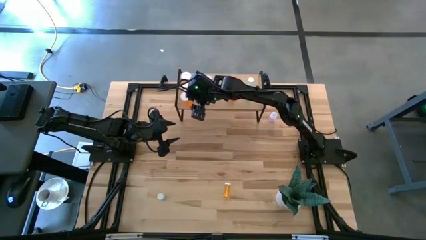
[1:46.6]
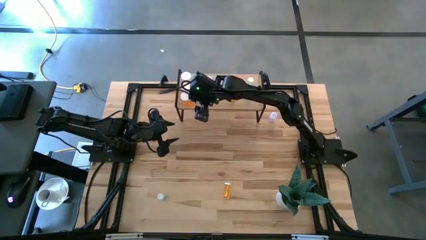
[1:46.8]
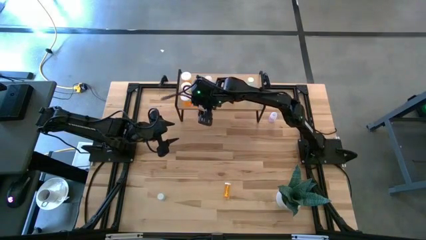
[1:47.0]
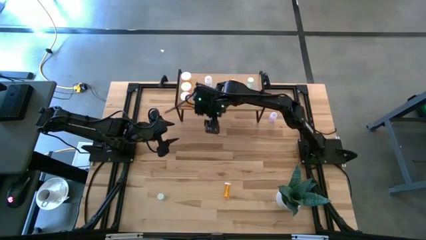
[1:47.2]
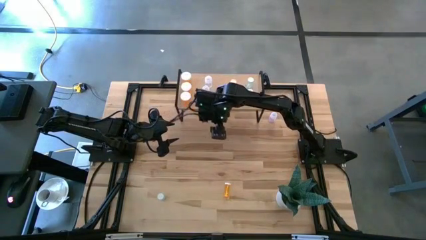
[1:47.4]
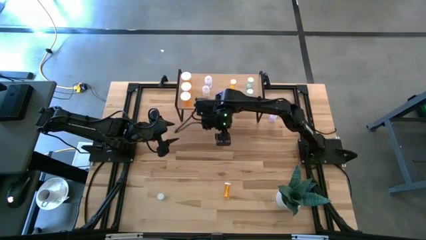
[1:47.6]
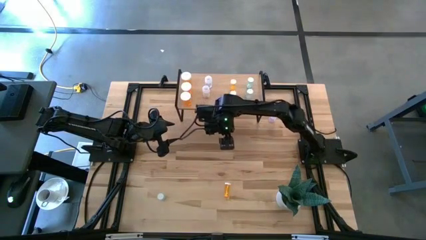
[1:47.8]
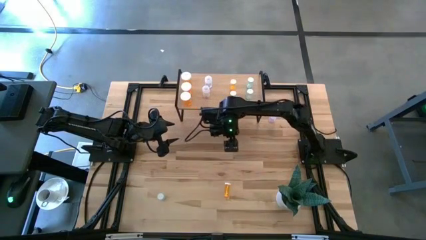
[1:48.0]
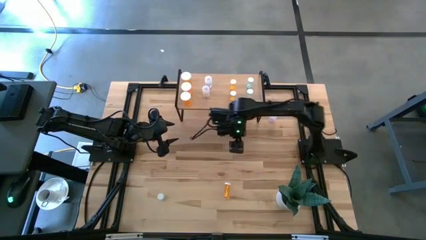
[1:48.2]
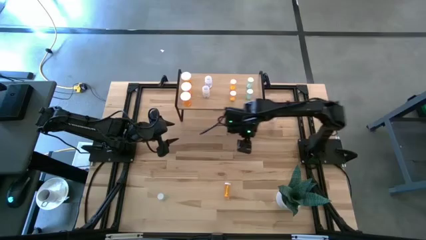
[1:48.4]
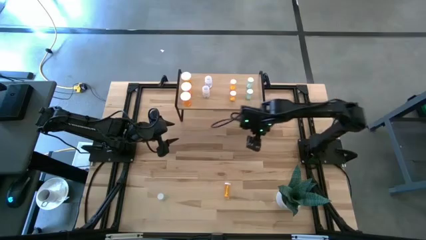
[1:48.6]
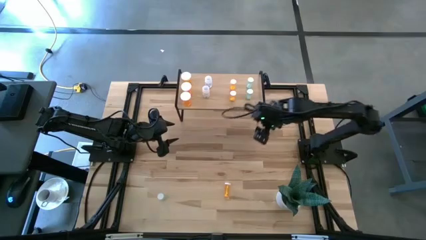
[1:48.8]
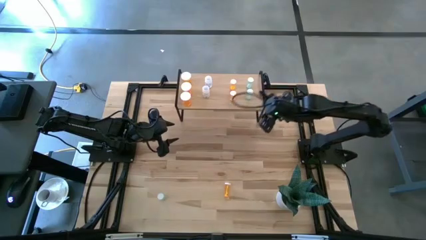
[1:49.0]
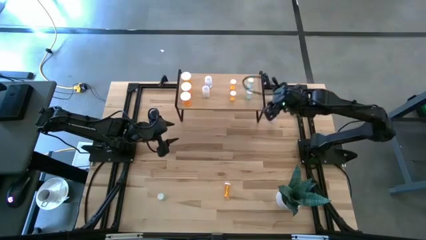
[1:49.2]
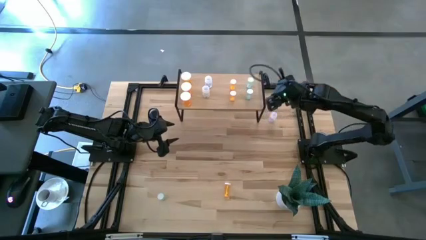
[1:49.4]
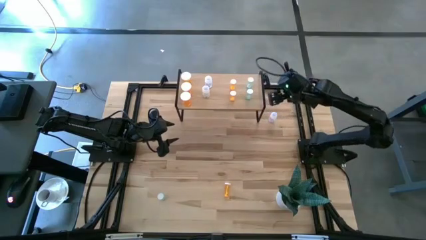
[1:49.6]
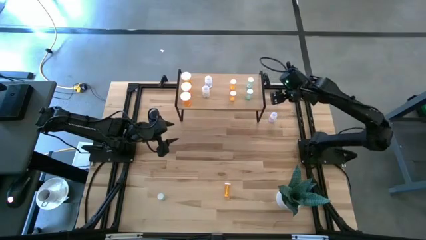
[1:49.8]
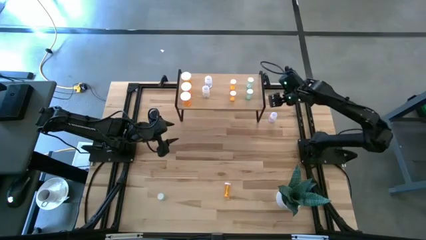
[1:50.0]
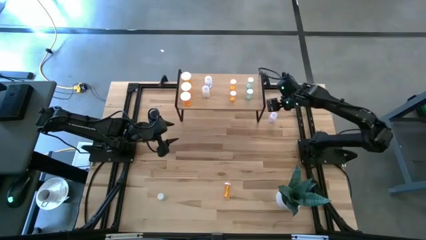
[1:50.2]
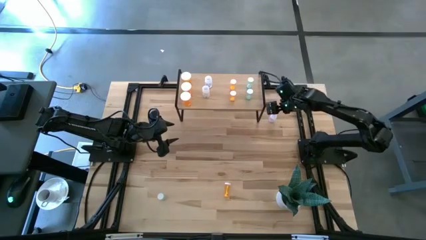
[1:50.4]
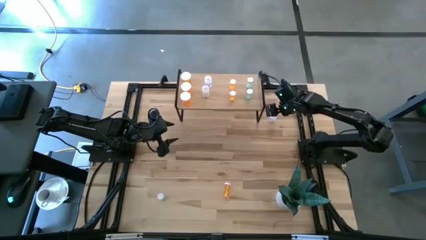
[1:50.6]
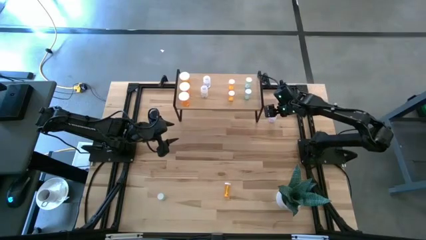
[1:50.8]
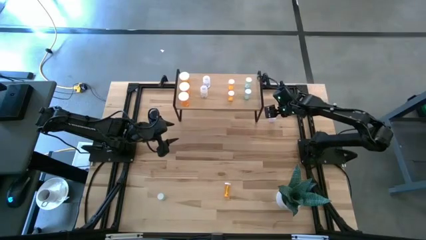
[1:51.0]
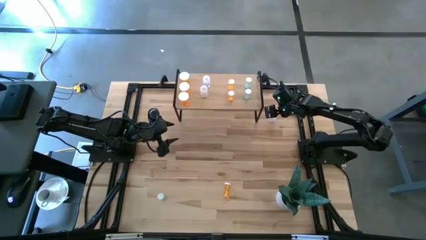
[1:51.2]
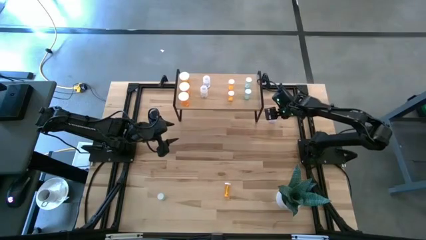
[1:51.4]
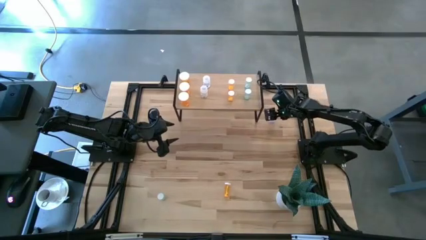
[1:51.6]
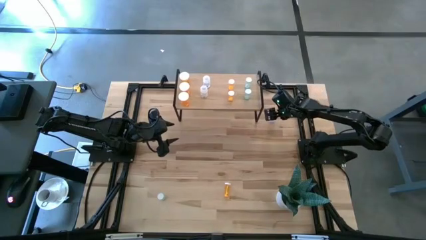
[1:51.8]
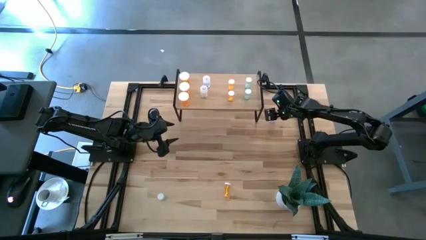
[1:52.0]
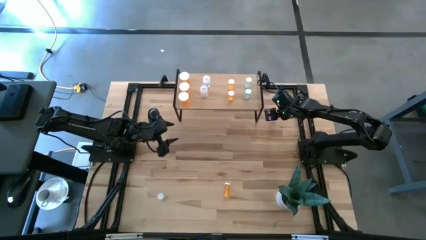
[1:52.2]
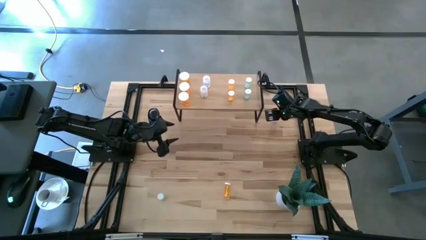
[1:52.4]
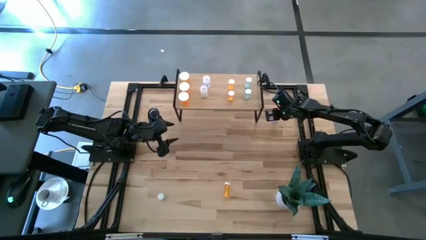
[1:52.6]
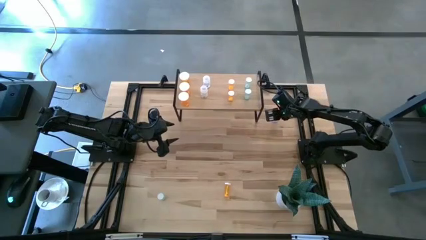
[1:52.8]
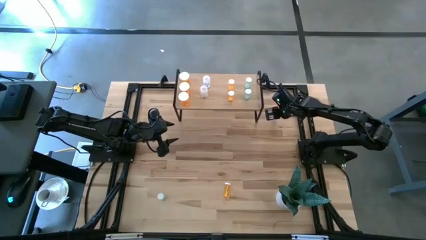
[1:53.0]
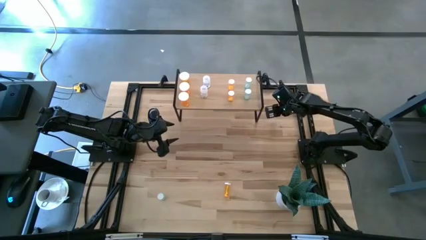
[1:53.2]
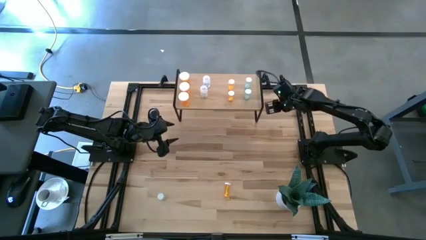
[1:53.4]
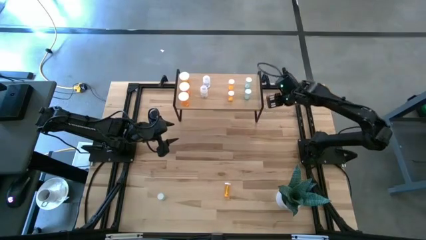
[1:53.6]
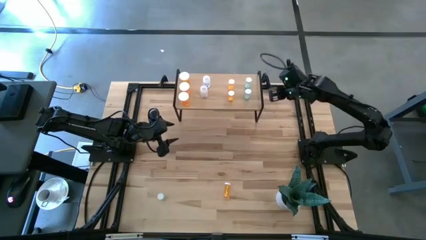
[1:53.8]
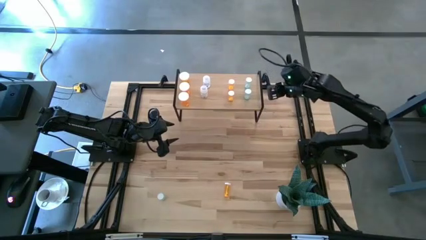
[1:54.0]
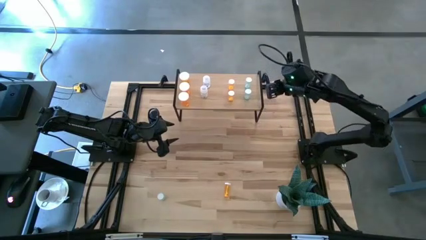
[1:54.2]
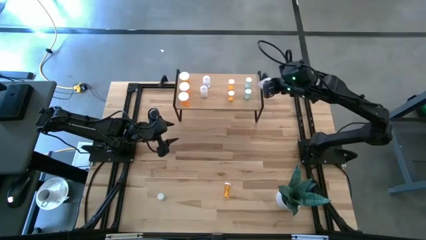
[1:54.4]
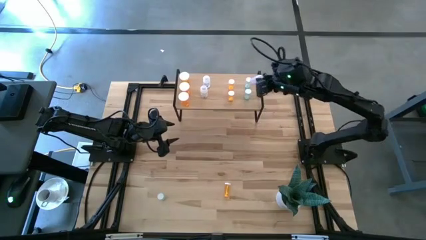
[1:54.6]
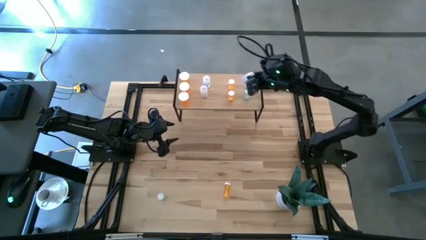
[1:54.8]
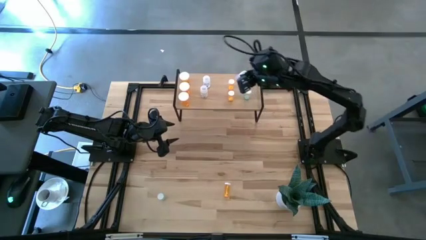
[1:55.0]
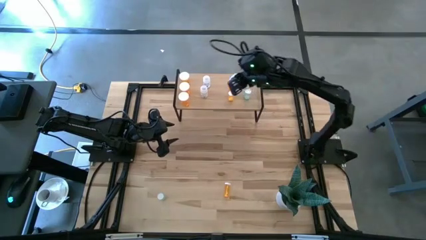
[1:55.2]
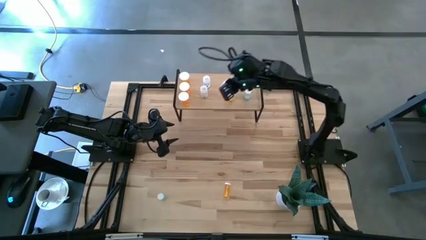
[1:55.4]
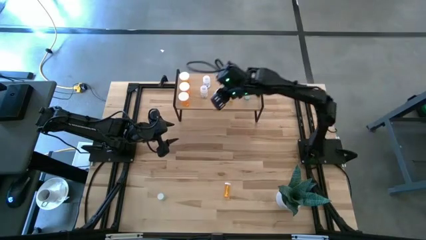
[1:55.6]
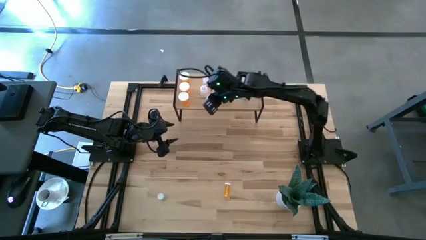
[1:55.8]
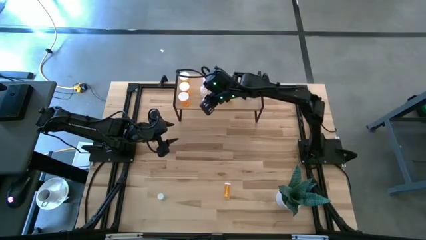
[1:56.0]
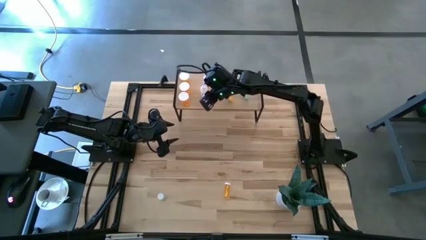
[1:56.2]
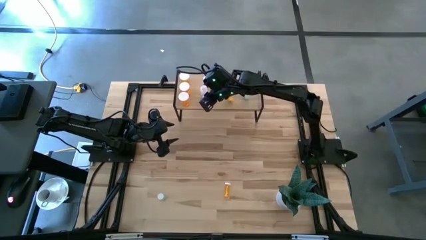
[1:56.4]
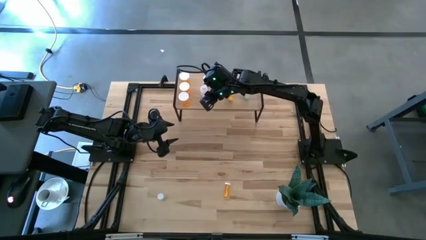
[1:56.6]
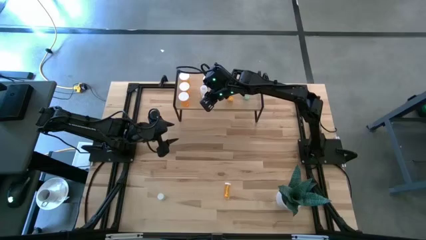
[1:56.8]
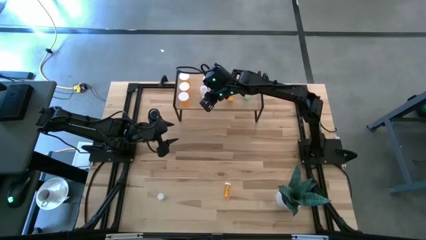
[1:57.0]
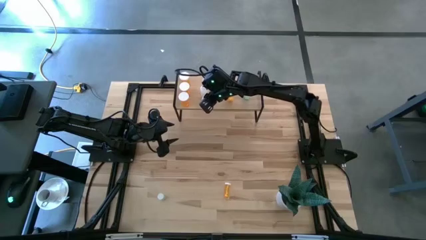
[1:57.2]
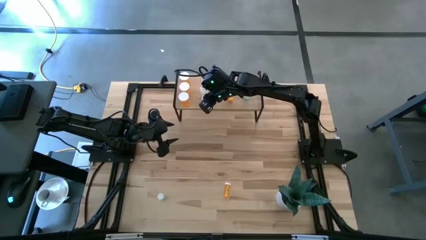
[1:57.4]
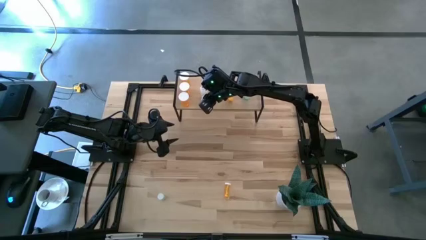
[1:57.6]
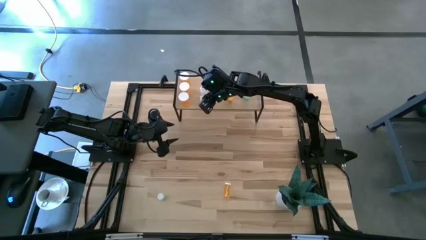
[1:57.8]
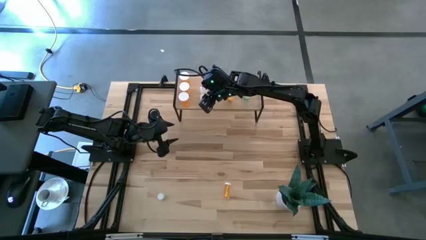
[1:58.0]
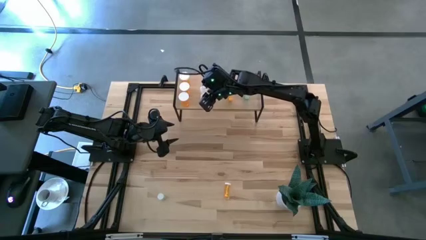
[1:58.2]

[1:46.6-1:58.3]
Task: Pick and place medicine bottles onto shelf by color
Put the top right transparent pill bottle on the shelf aligned with the other transparent pill bottle

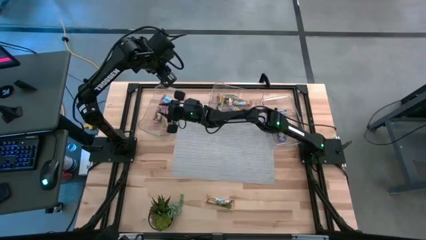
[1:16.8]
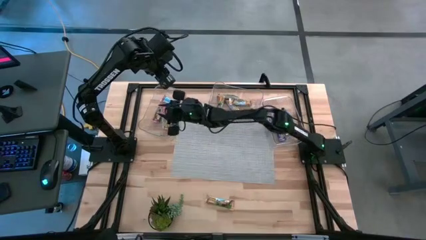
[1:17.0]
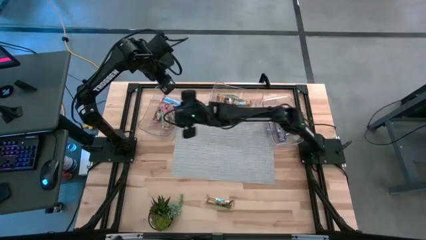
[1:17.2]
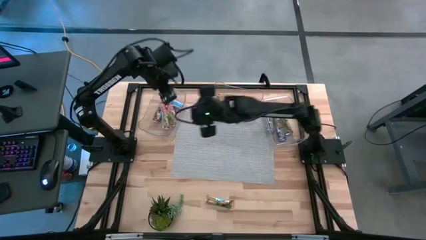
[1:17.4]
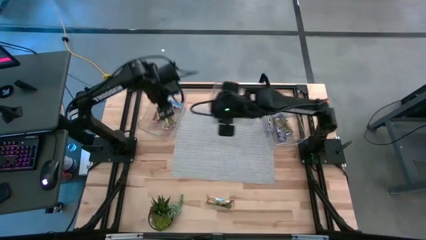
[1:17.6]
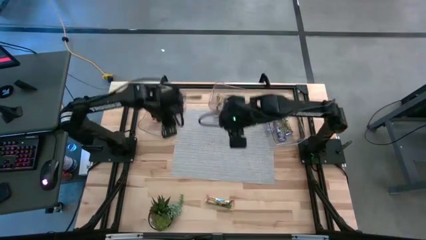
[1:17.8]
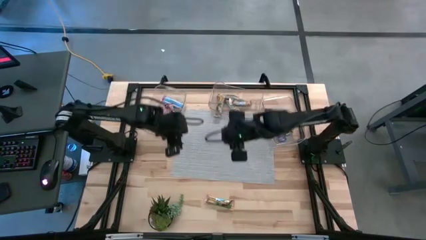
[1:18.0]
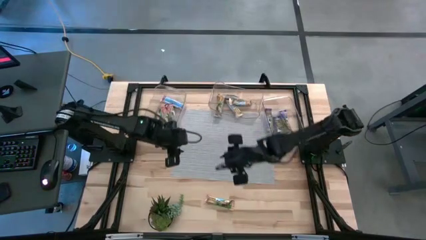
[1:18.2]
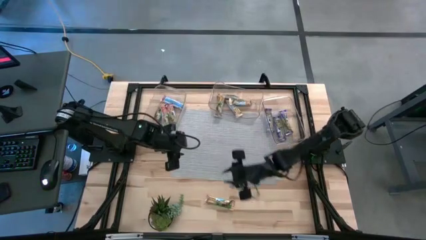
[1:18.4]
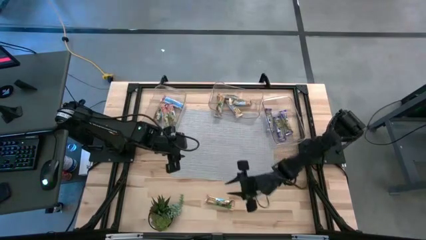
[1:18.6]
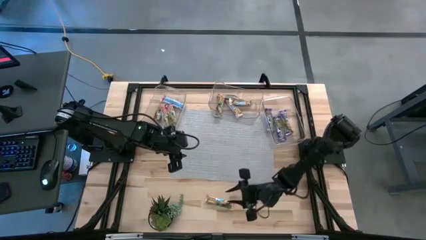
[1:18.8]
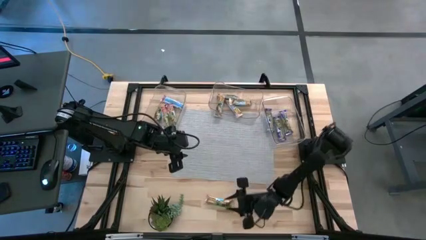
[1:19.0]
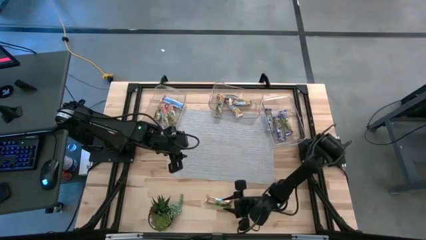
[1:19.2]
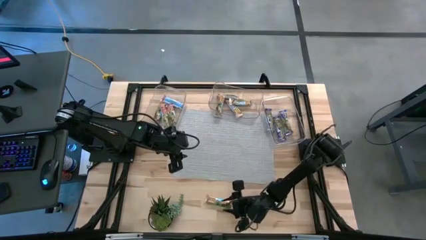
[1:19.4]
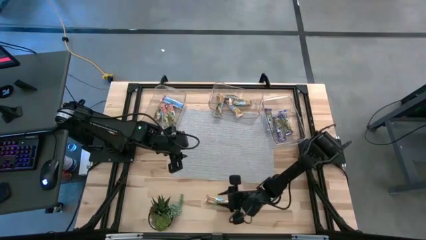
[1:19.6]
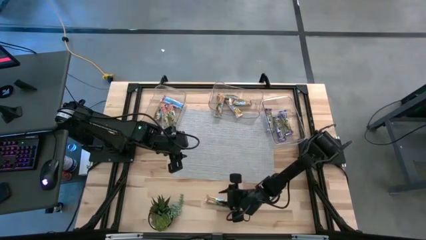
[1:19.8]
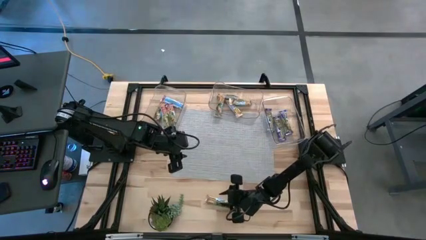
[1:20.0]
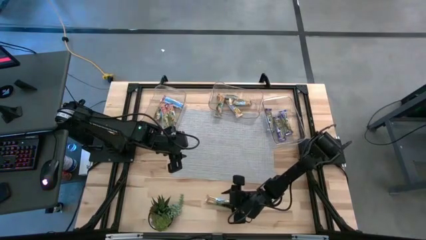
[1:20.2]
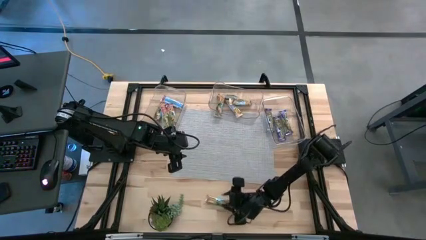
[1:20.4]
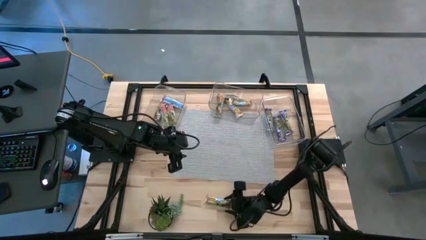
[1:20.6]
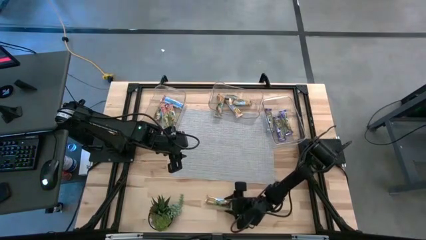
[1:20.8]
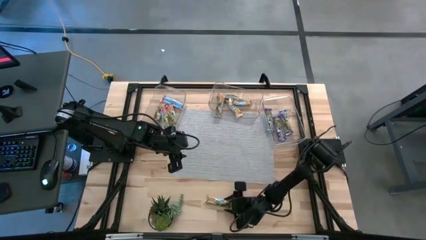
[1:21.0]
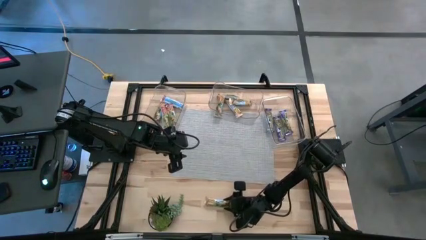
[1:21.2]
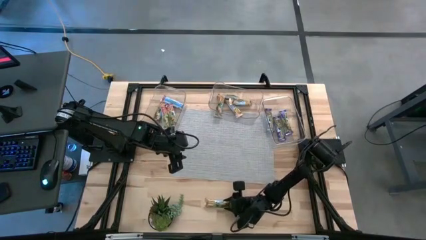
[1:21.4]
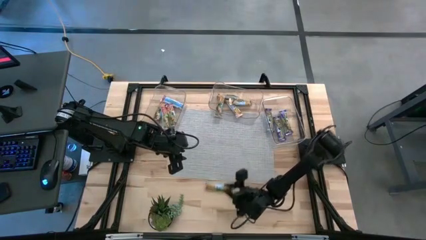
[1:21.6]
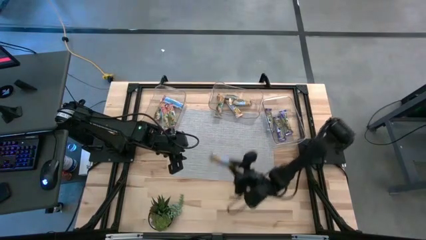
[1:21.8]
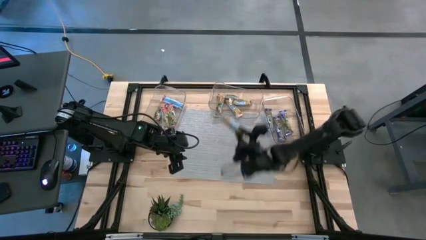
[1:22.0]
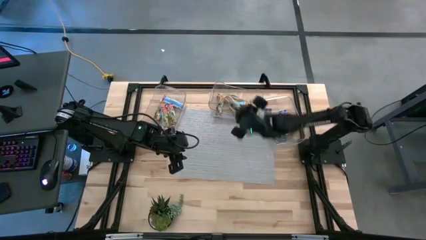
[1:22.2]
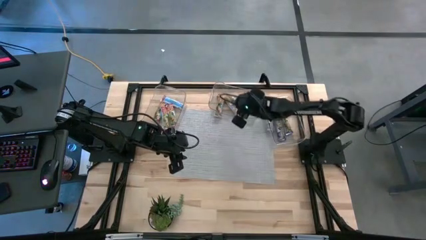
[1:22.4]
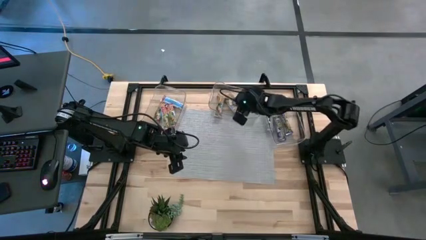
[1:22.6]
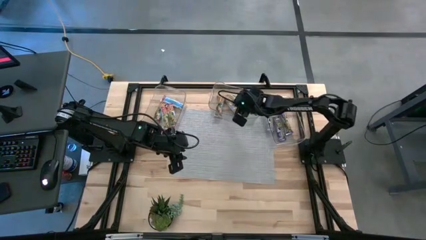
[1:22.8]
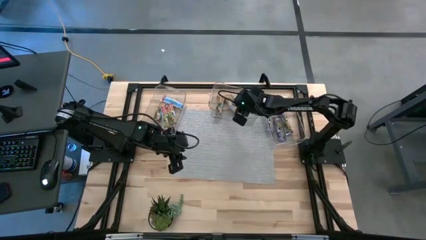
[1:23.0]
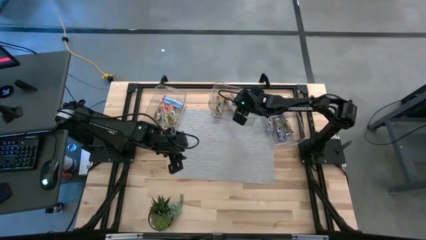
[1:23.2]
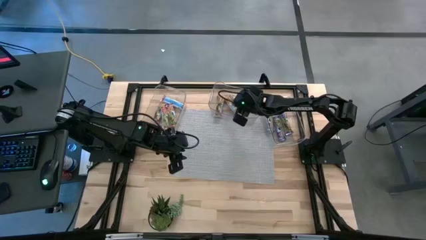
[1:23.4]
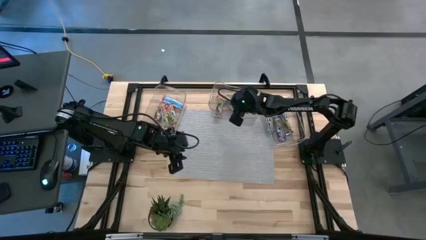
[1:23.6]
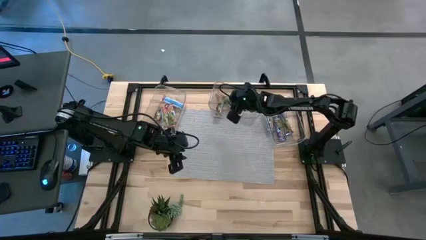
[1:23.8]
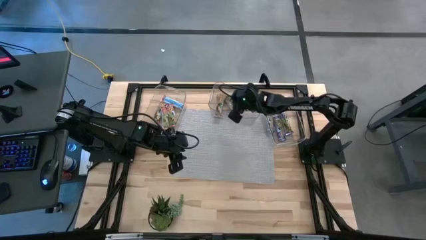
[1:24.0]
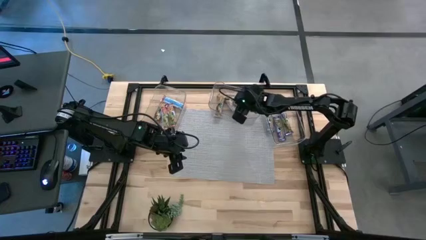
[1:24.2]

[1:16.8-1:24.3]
Task: Pick and place Granola Bars by type
Put the yellow granola bar into the middle transparent bin
